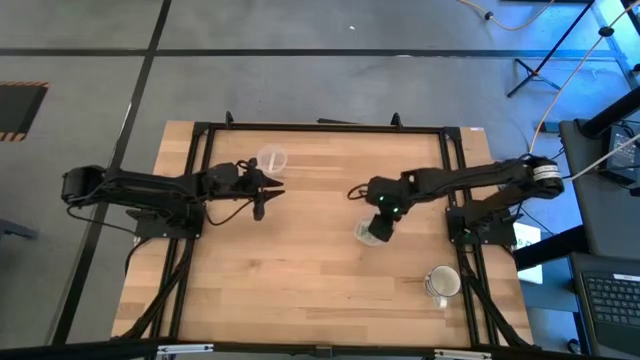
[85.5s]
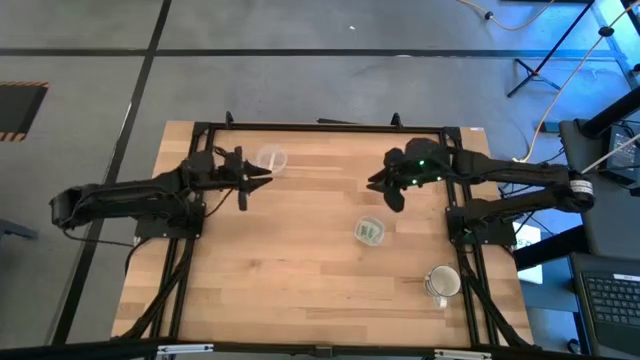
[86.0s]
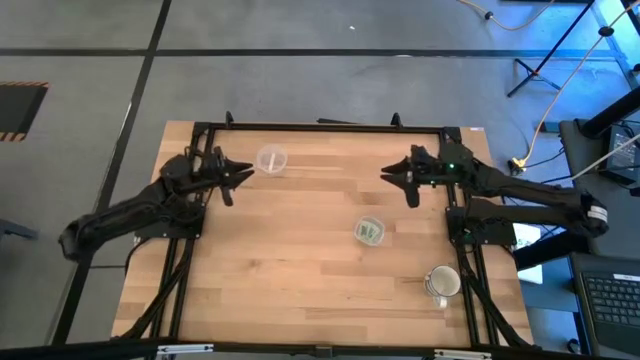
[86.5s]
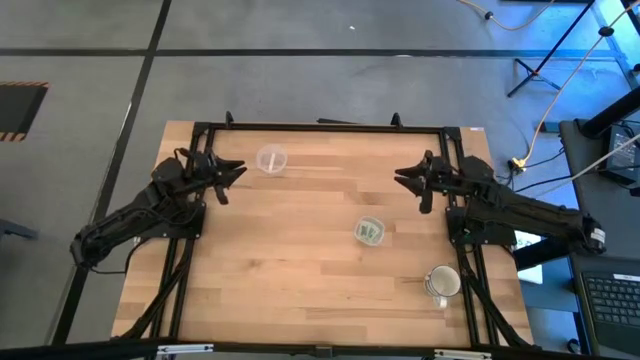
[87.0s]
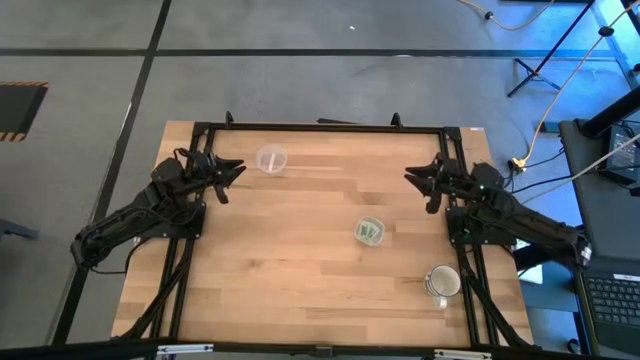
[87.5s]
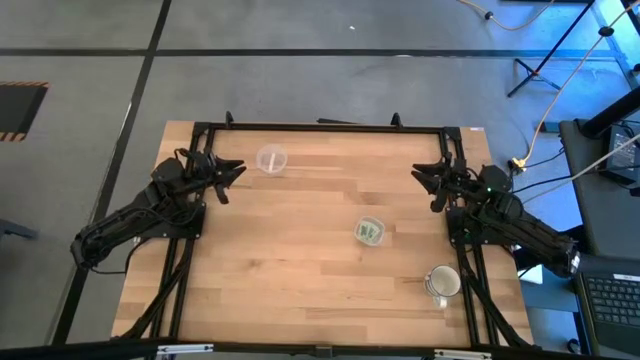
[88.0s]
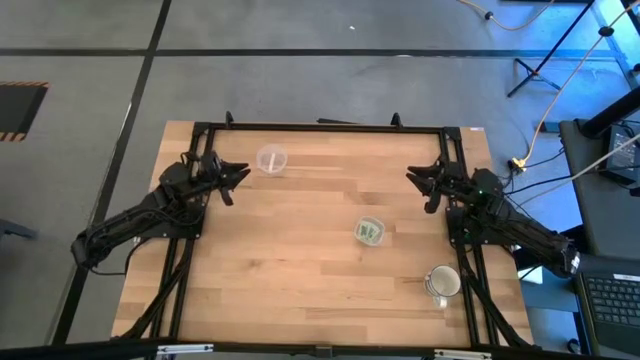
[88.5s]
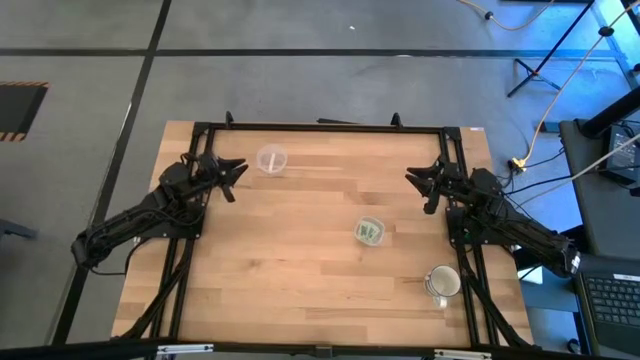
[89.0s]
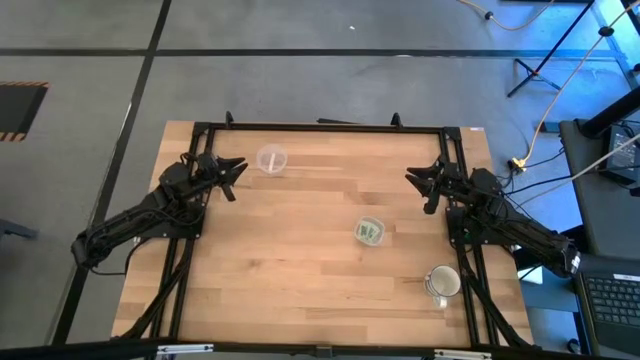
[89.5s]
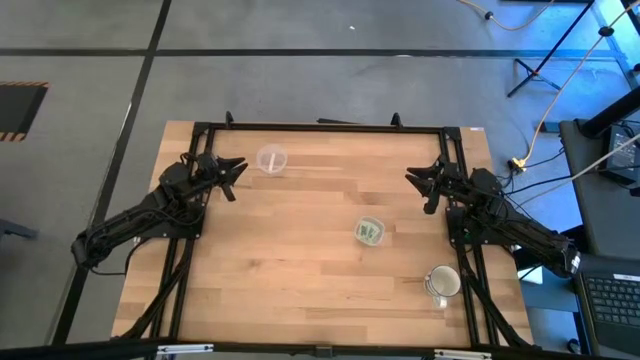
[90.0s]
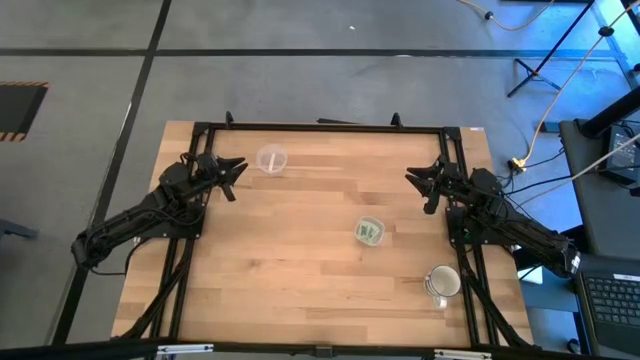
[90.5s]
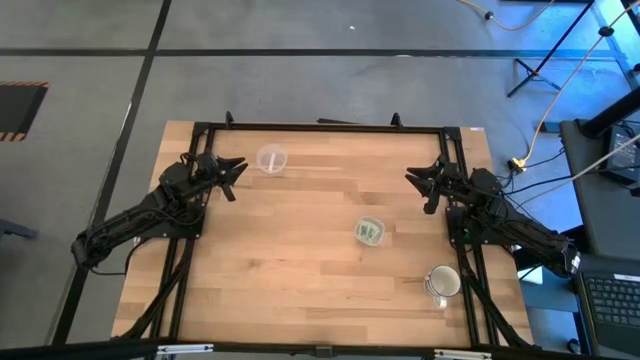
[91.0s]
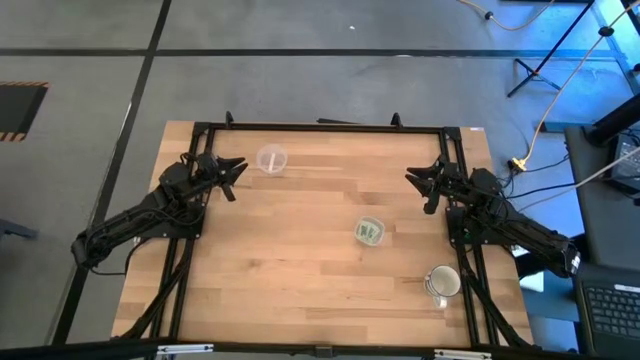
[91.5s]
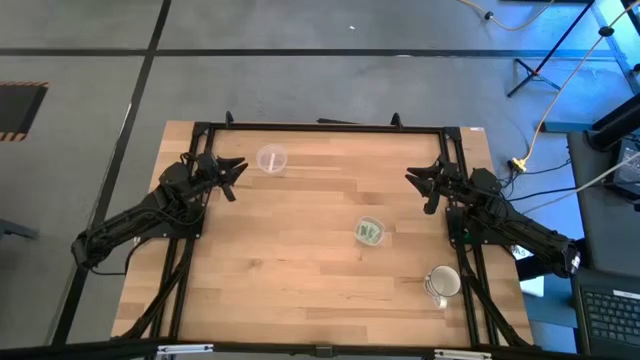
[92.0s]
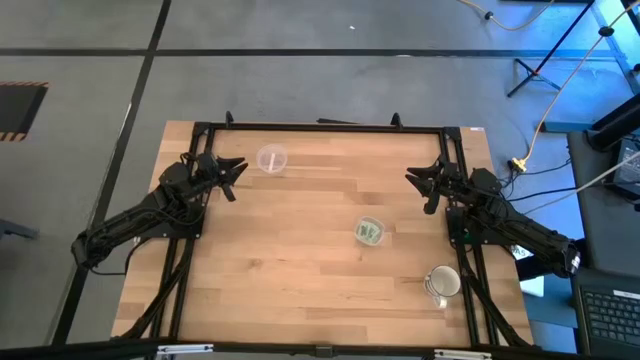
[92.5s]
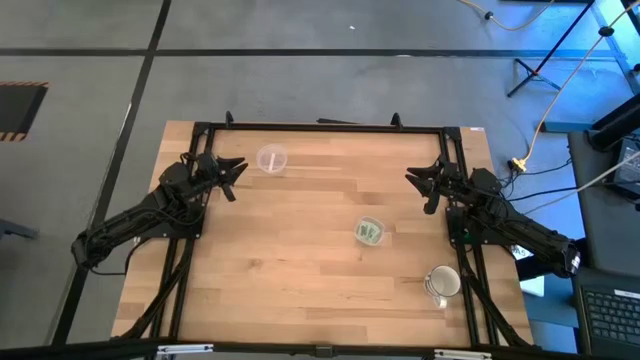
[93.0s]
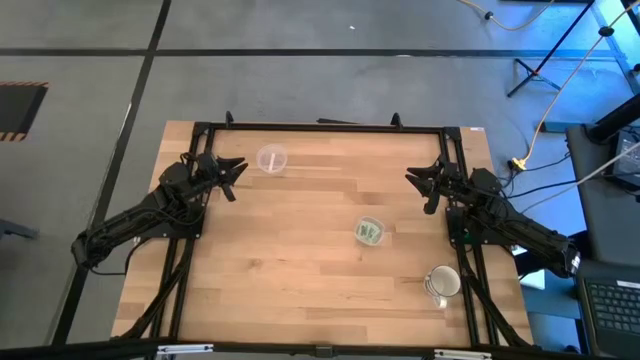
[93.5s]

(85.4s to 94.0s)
Task: Pick and place Stevia / Truvia into bins
Return to Home Position

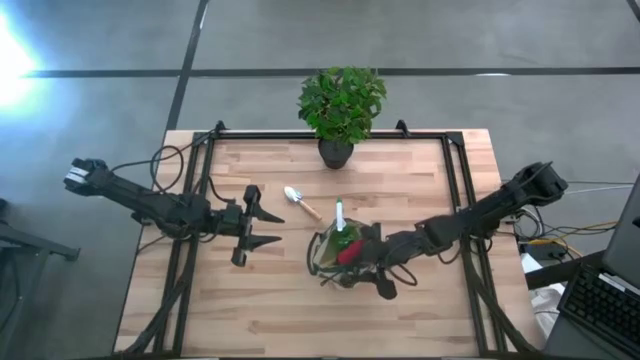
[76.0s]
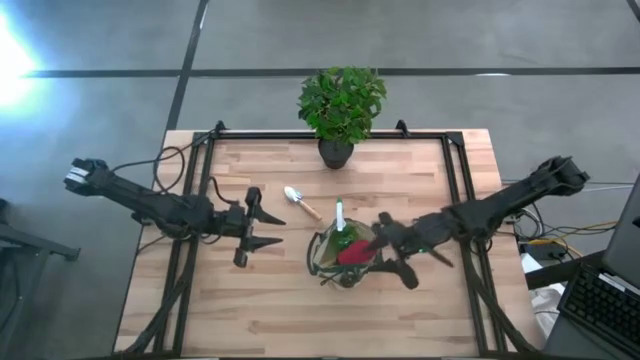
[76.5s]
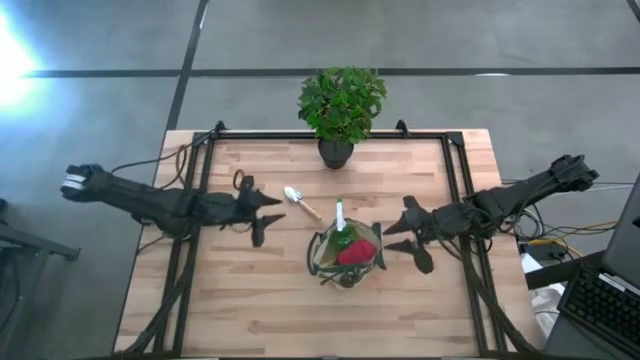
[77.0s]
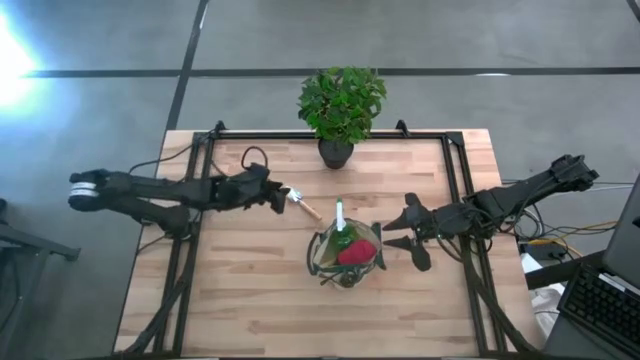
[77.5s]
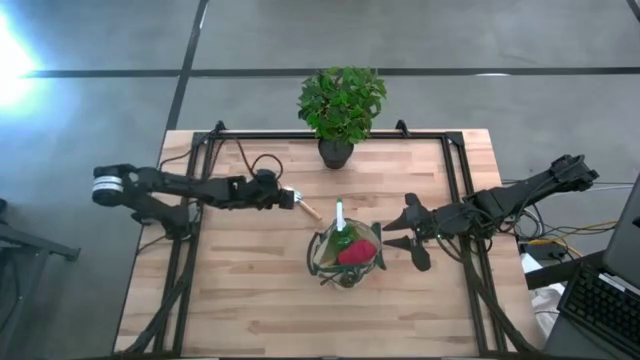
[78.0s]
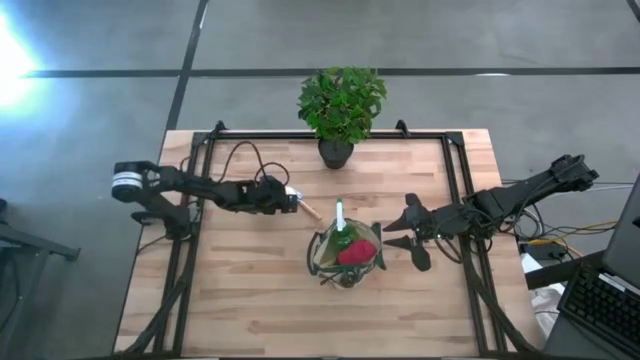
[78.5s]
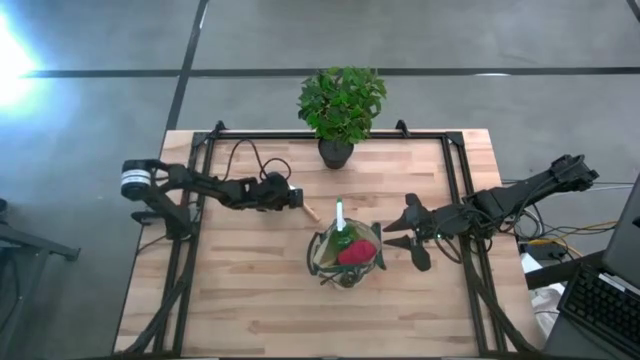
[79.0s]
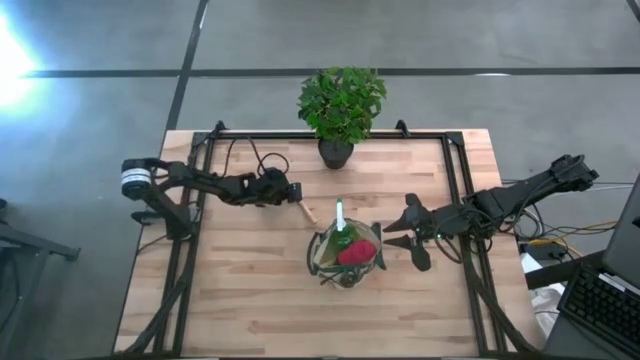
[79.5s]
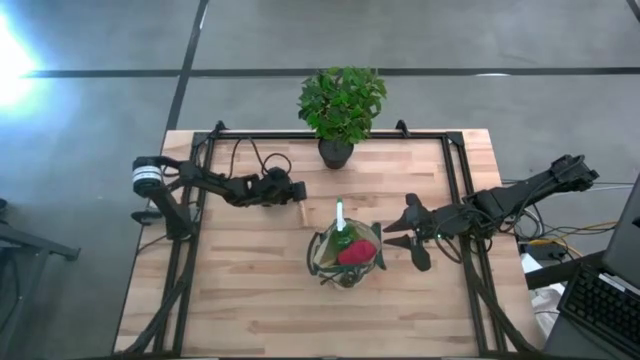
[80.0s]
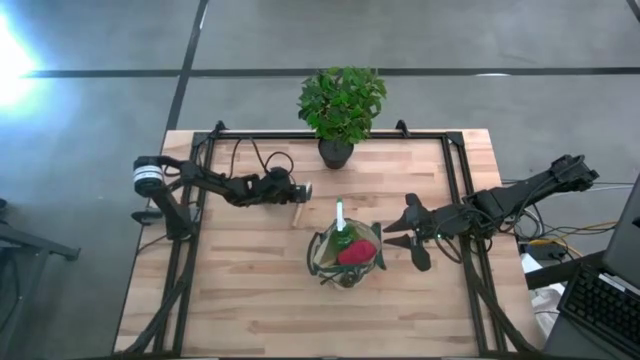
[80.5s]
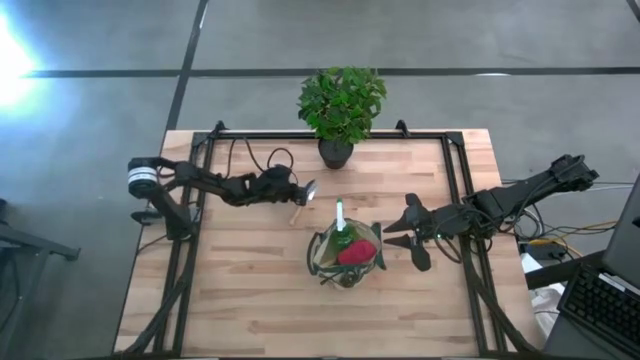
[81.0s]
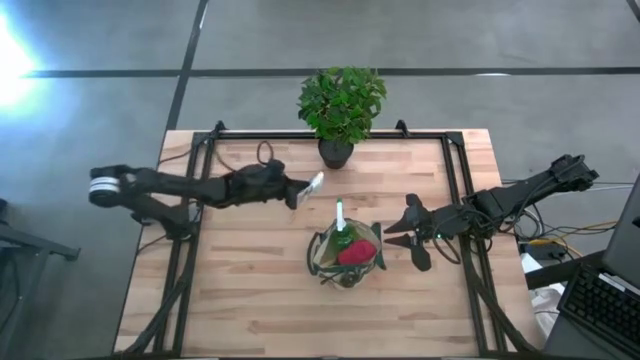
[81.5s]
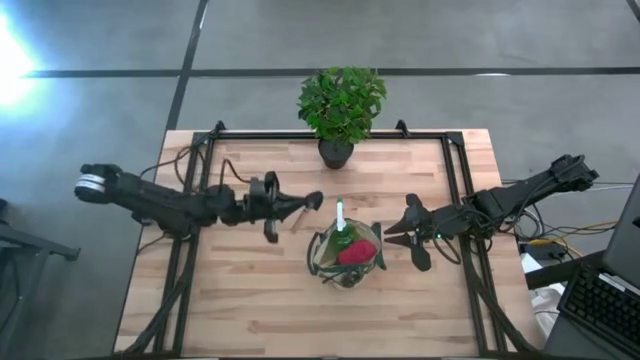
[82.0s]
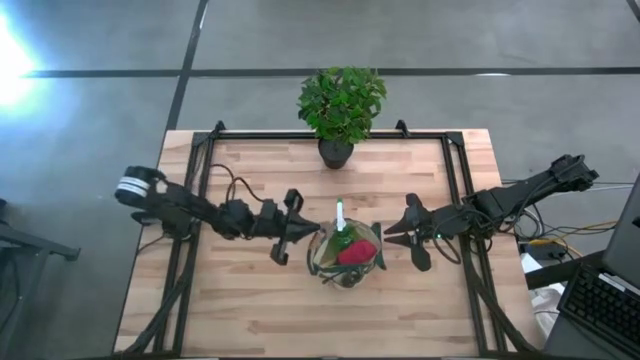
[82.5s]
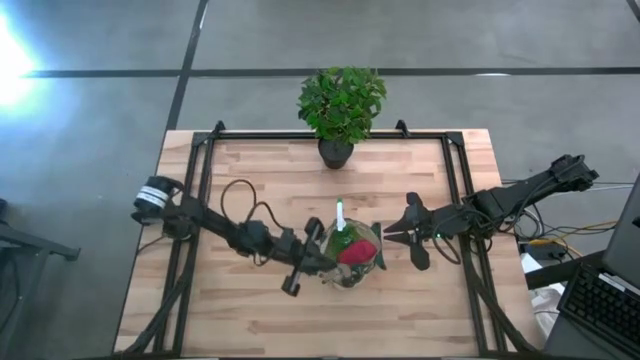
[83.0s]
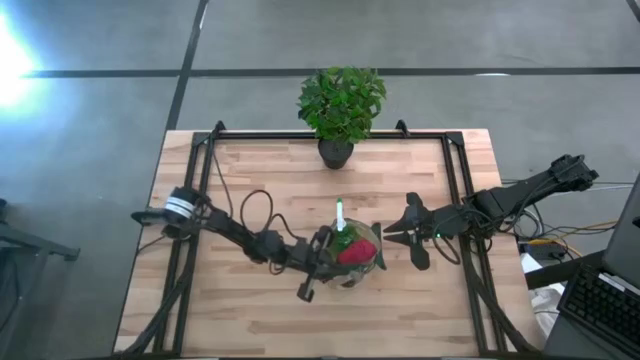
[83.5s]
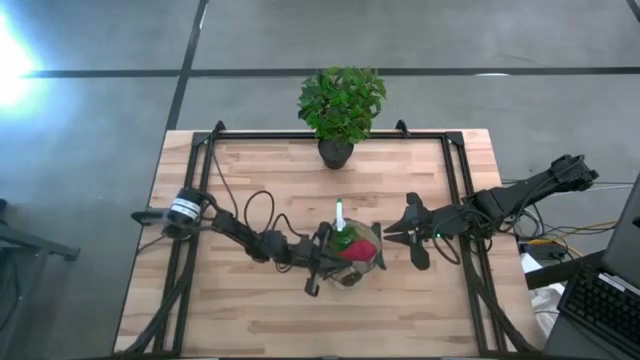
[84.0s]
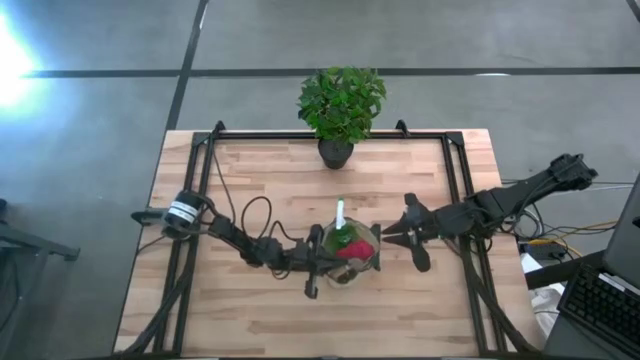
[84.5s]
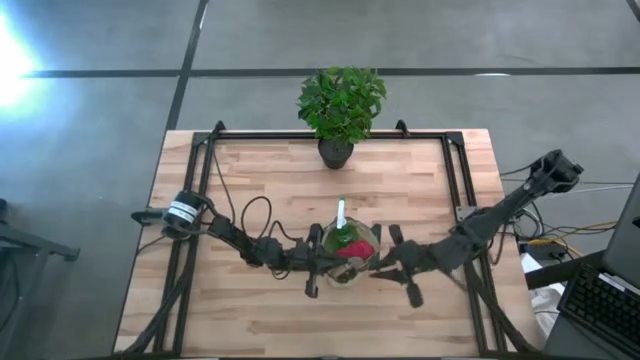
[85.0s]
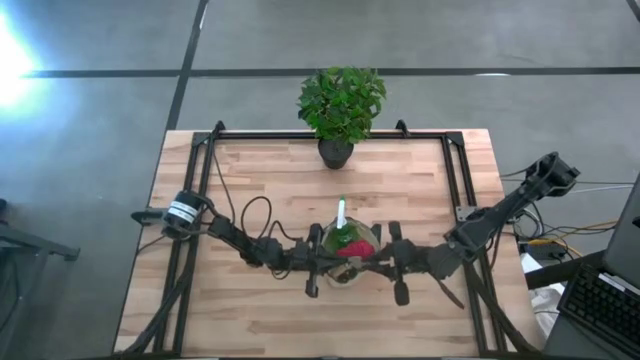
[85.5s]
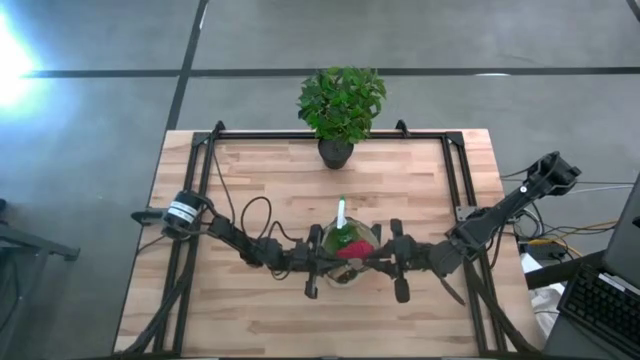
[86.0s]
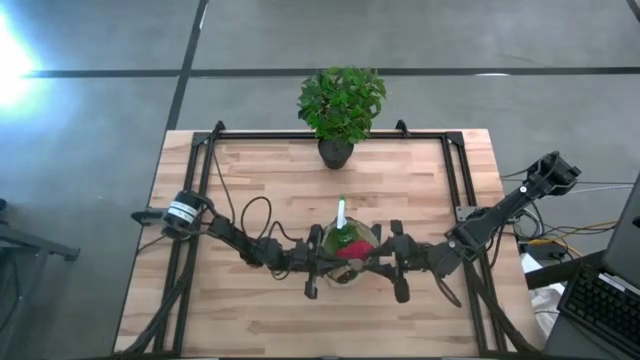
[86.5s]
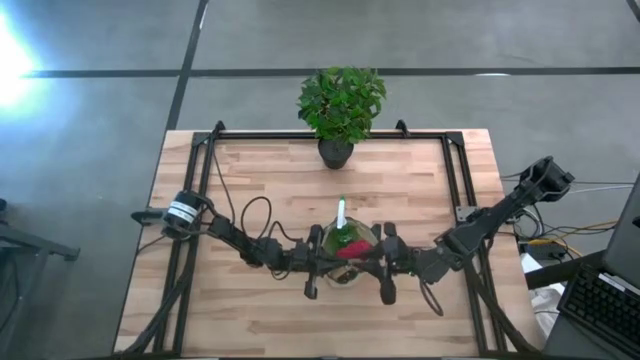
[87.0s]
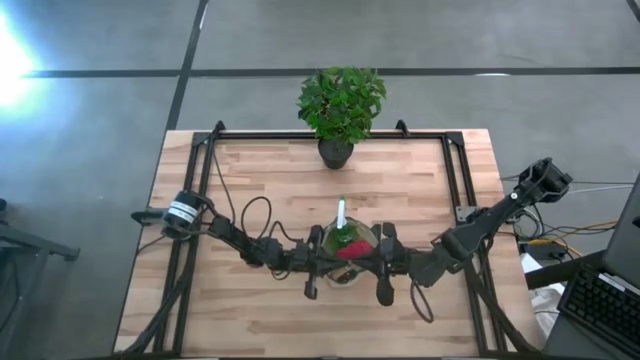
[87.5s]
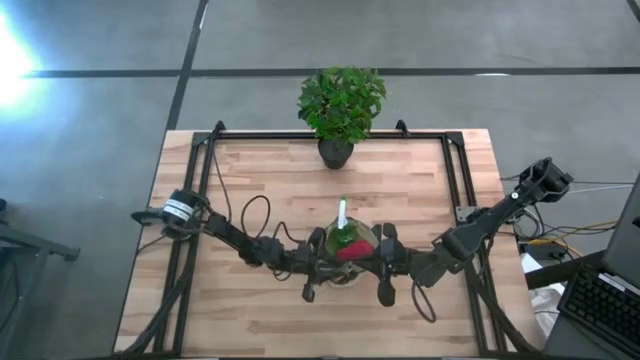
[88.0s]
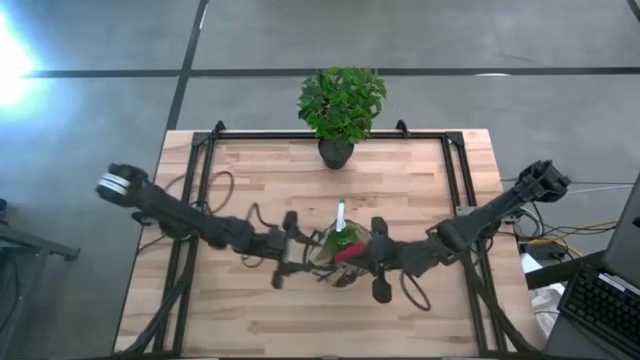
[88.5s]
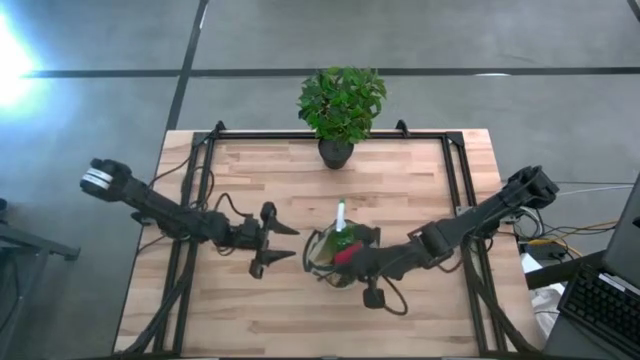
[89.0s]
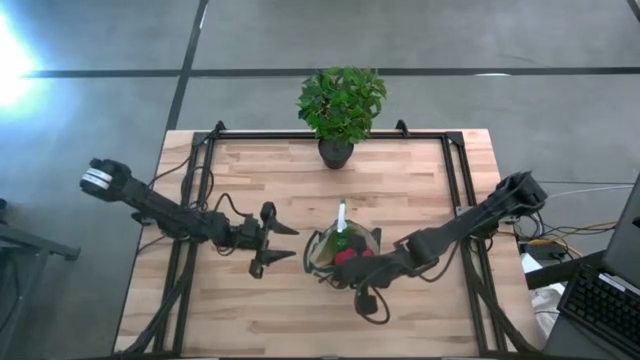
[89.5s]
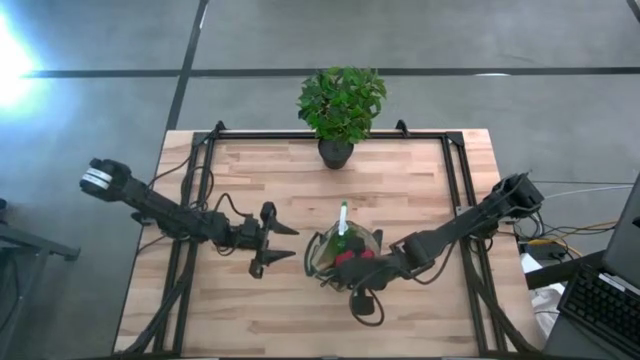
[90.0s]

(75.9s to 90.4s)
Task: Pick & Place Garden tools in Gardening bag
Put the brown trowel into the gardening bag
